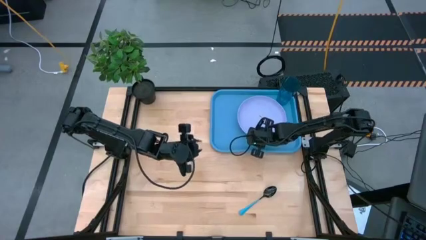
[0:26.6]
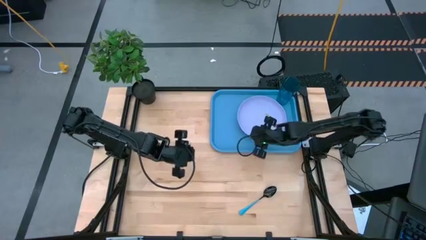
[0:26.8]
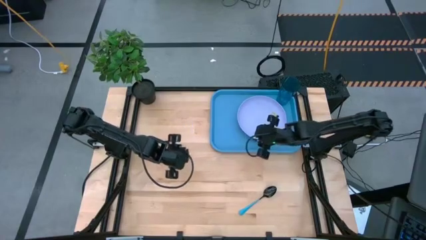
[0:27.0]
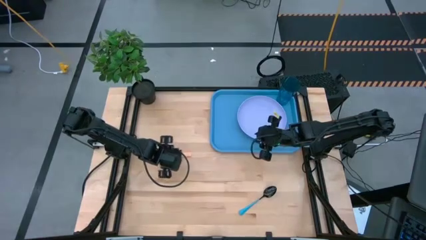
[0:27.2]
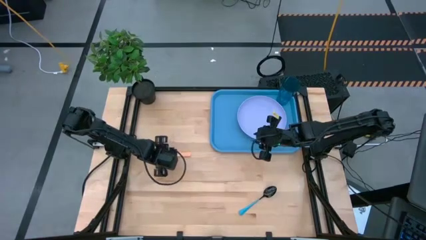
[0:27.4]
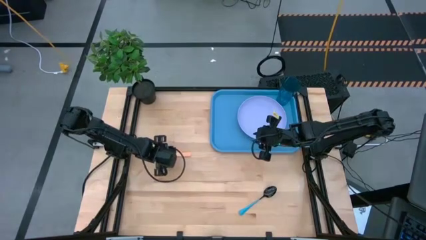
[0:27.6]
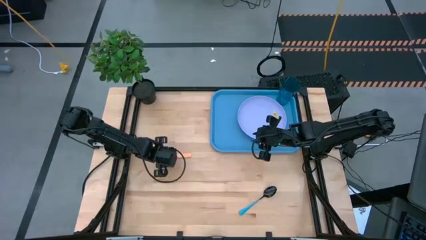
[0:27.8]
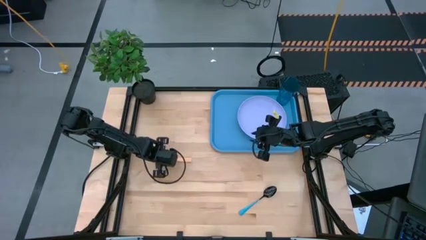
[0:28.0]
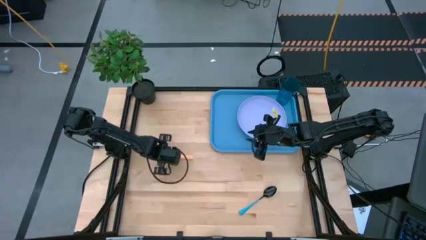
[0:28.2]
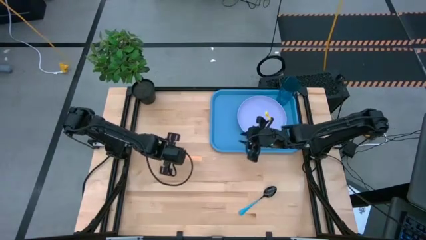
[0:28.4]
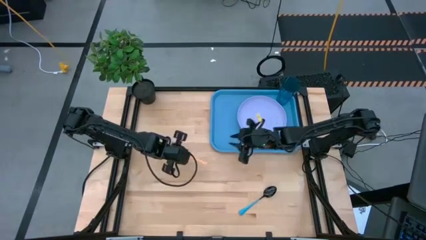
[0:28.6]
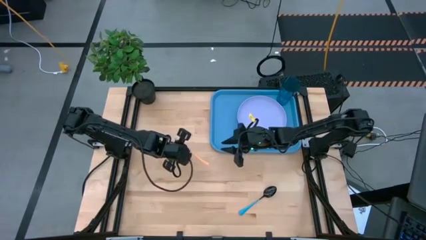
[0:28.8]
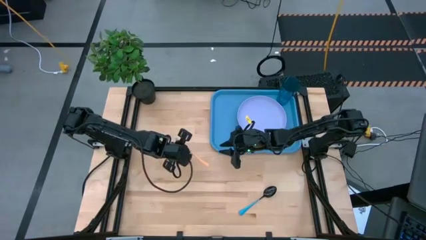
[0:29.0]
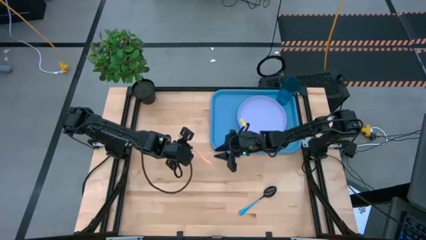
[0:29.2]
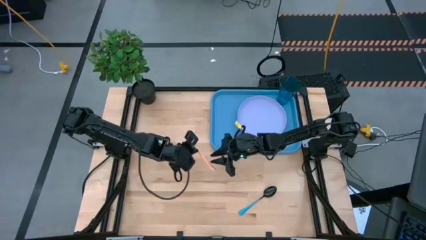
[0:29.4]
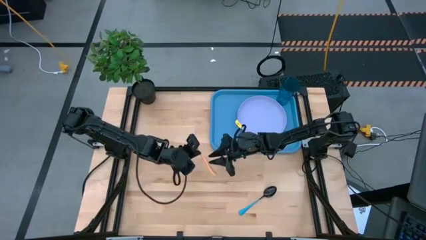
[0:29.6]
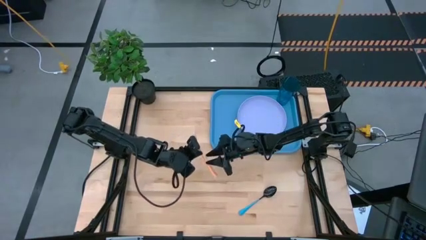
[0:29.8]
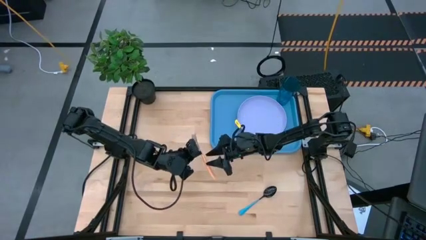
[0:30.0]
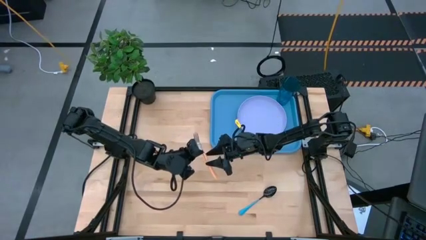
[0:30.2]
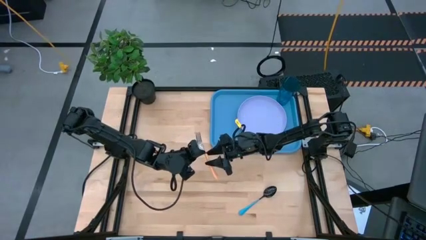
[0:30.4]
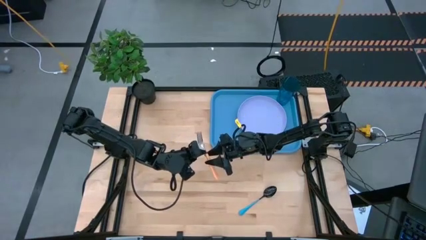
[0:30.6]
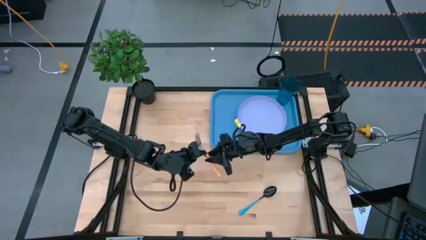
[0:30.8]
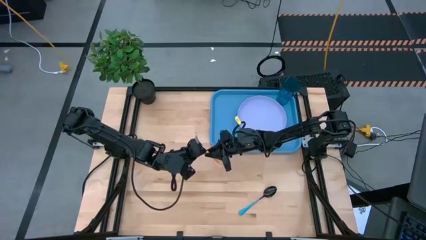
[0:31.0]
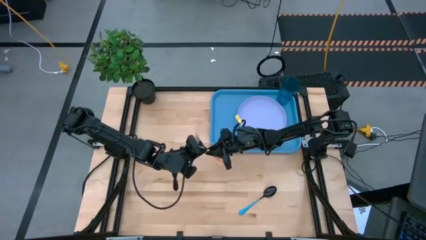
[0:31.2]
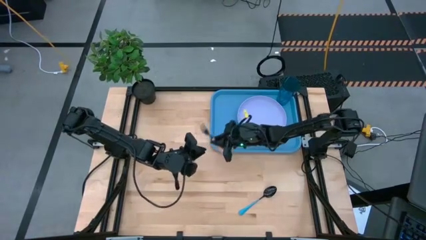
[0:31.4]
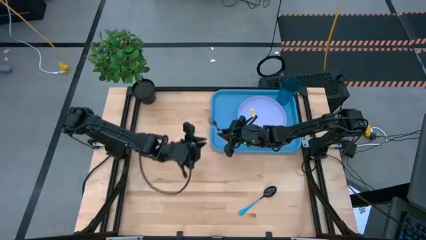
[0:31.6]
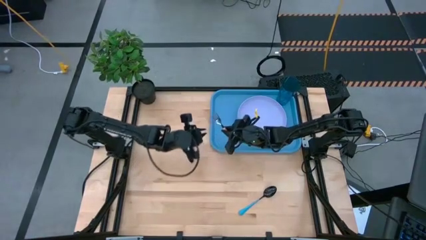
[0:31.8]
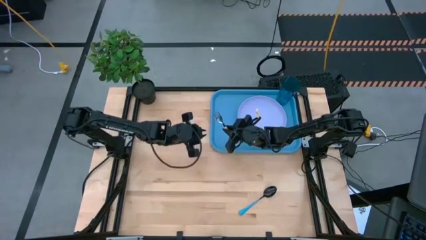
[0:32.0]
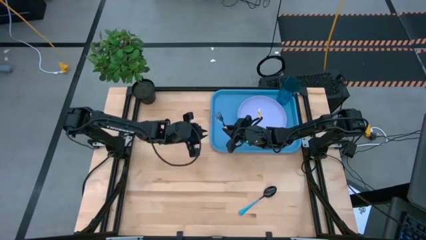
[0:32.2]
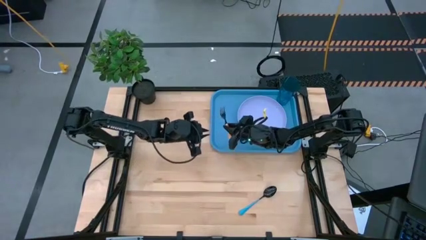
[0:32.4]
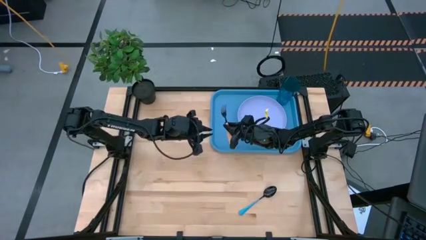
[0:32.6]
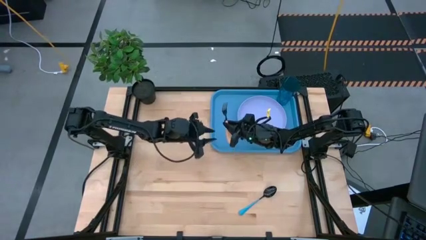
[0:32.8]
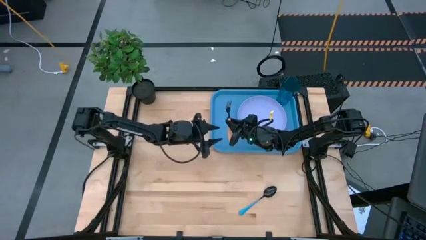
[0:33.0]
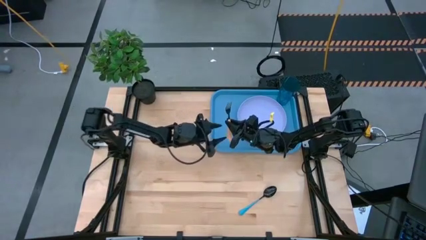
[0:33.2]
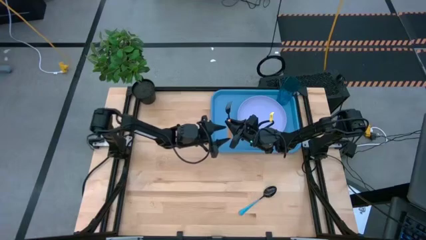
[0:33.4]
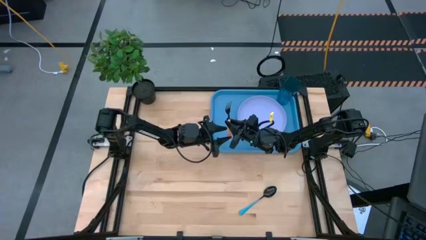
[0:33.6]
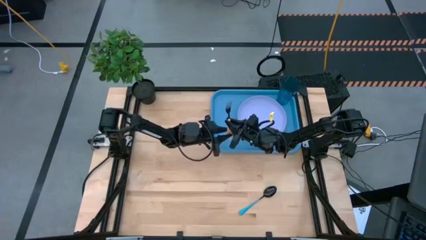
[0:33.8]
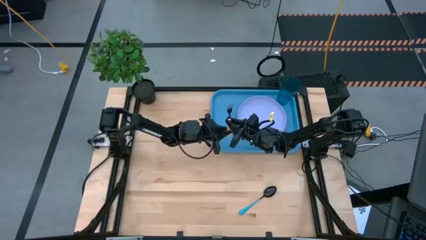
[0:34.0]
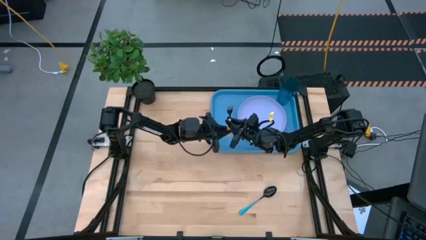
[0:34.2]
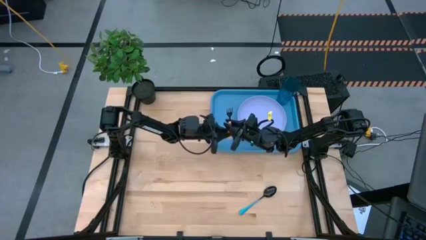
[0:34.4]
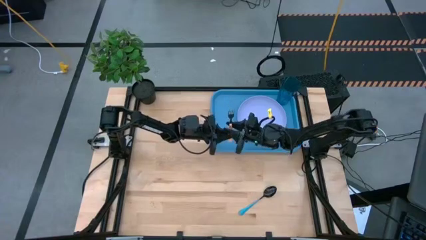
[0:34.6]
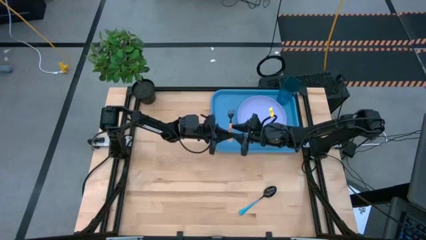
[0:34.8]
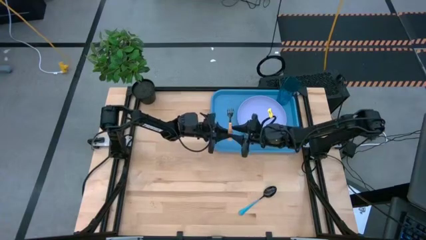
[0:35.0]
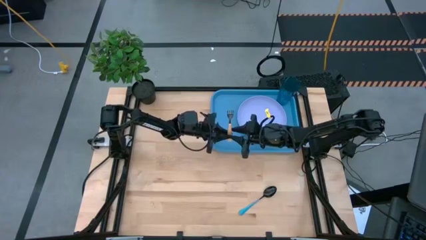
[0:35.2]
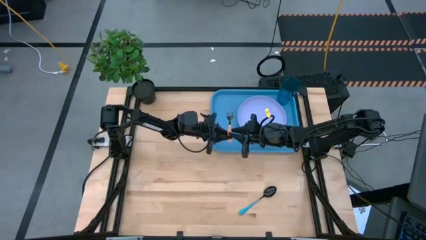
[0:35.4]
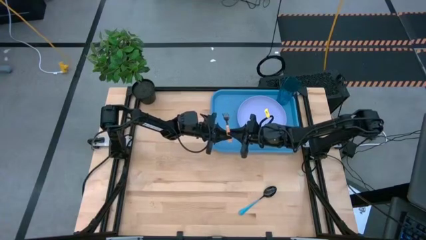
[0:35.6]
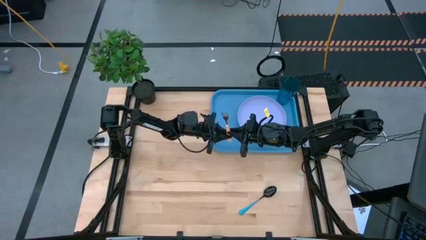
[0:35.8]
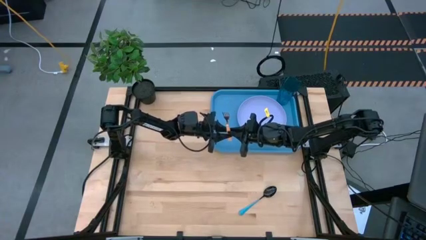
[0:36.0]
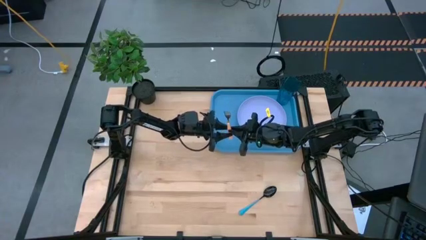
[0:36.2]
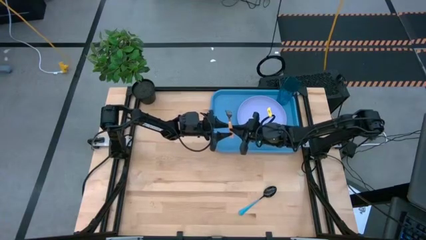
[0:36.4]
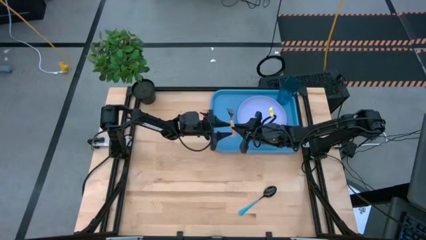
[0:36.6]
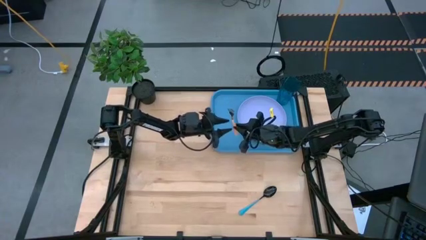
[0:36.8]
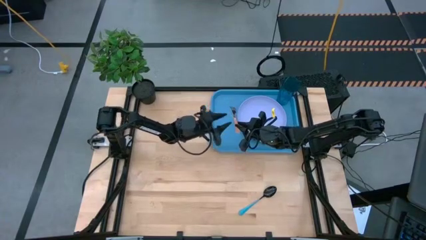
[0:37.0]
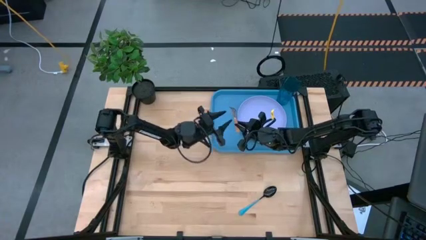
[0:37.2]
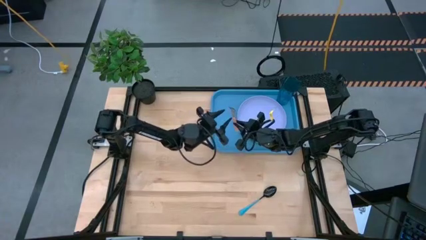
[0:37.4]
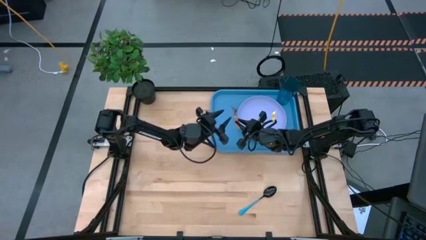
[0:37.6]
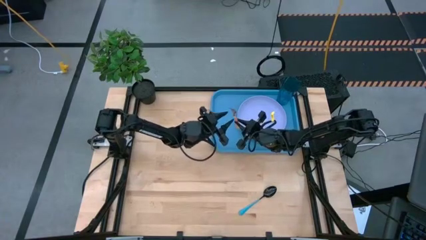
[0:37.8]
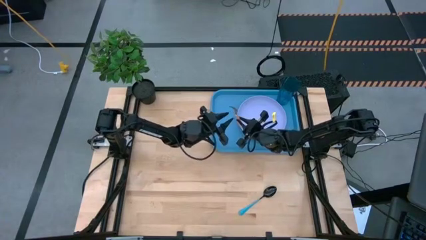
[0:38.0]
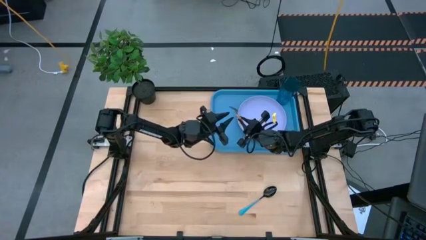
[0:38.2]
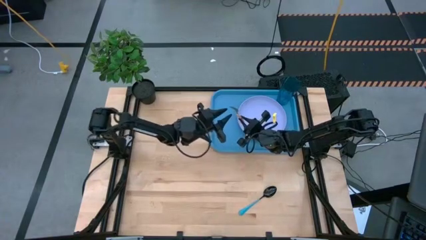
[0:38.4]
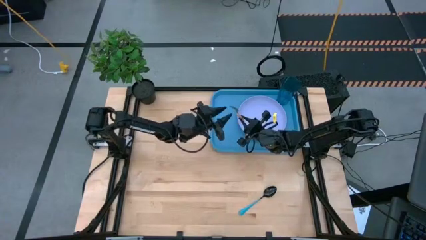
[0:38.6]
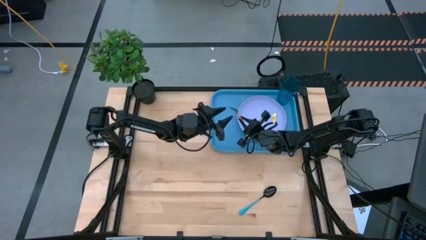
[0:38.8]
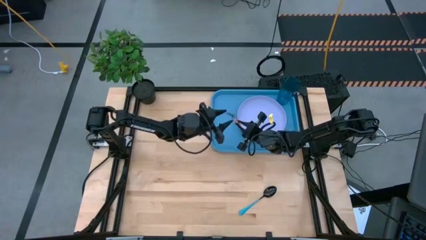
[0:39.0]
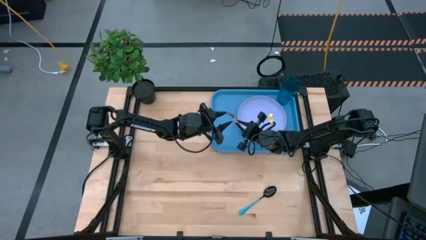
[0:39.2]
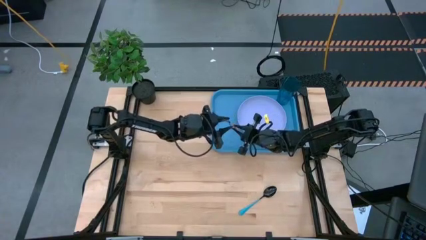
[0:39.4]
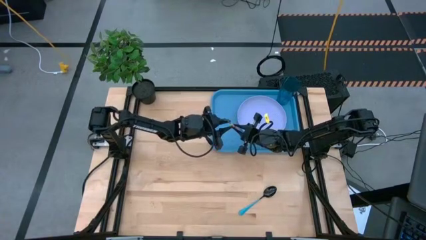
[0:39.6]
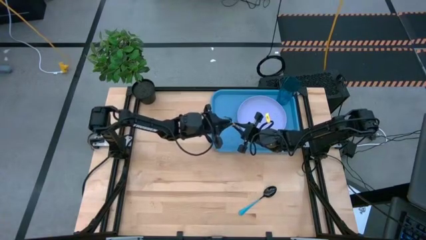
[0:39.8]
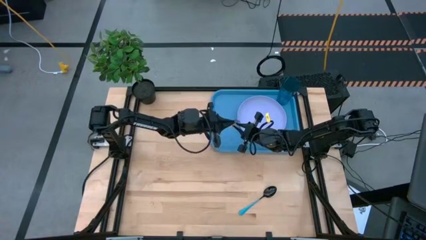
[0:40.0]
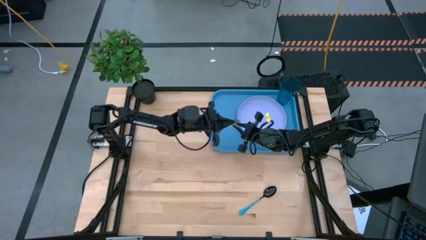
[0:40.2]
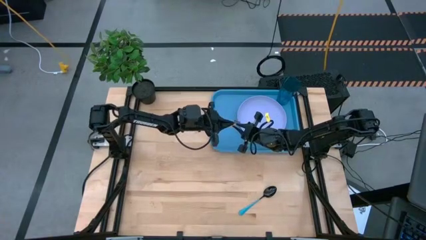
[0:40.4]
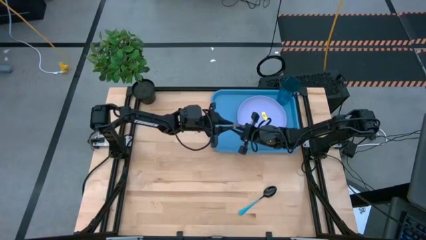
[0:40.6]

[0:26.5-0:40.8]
Task: Pick and place plate/cup/fork/spoon on tray
Put the brown fork on the blue tray to the left of the purple plate
